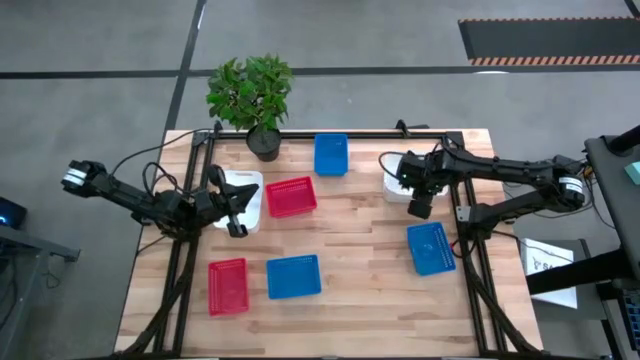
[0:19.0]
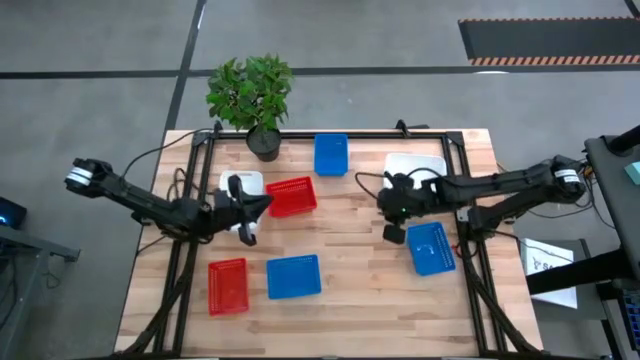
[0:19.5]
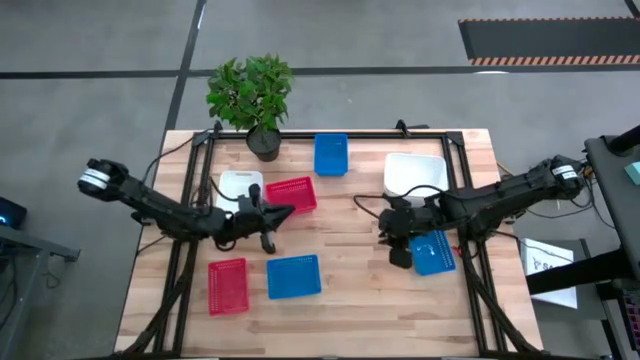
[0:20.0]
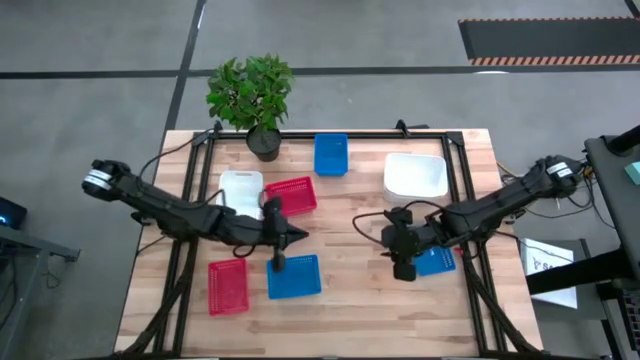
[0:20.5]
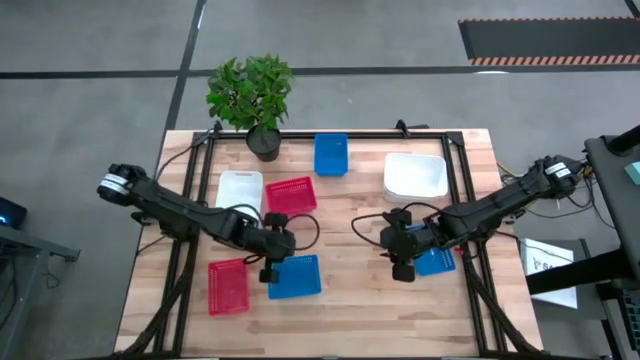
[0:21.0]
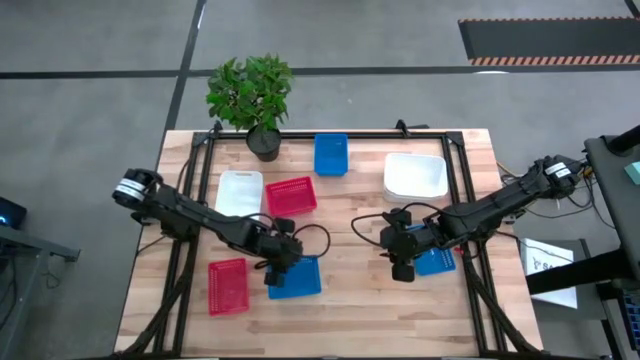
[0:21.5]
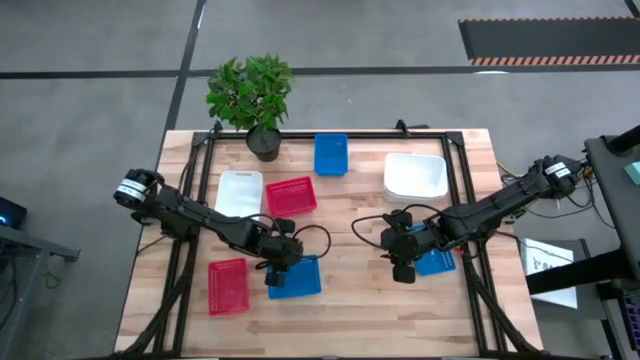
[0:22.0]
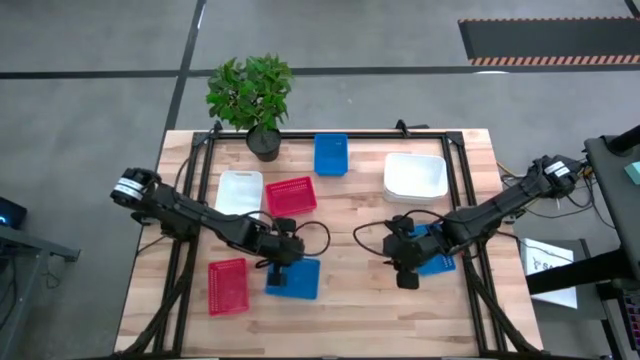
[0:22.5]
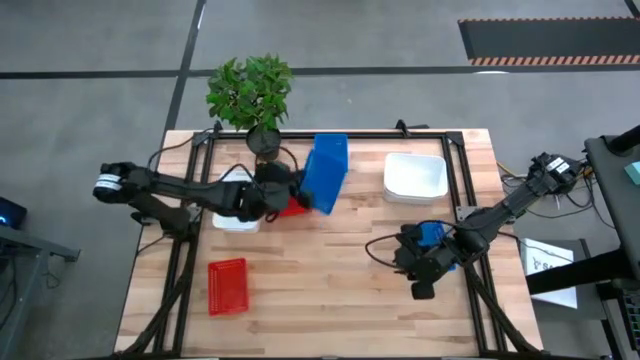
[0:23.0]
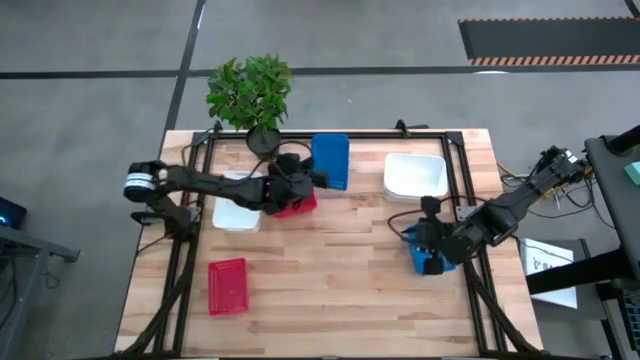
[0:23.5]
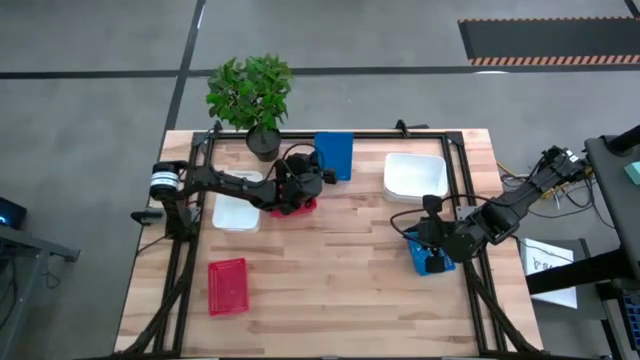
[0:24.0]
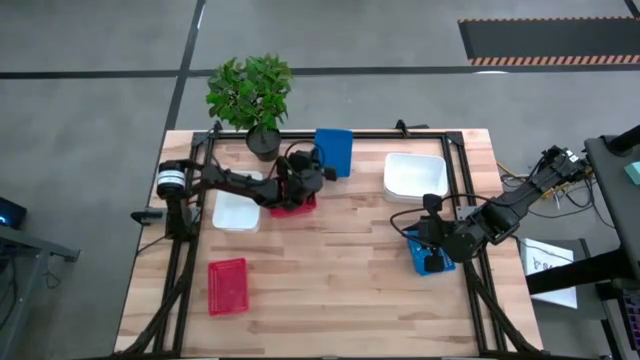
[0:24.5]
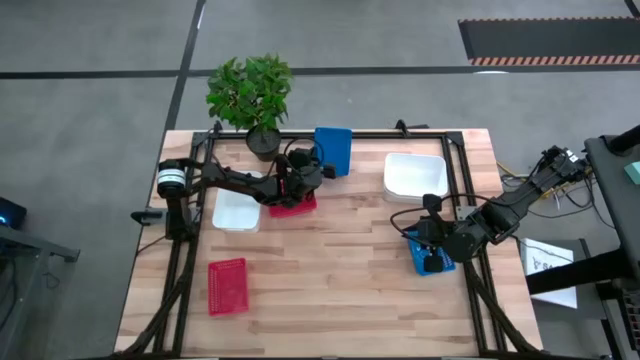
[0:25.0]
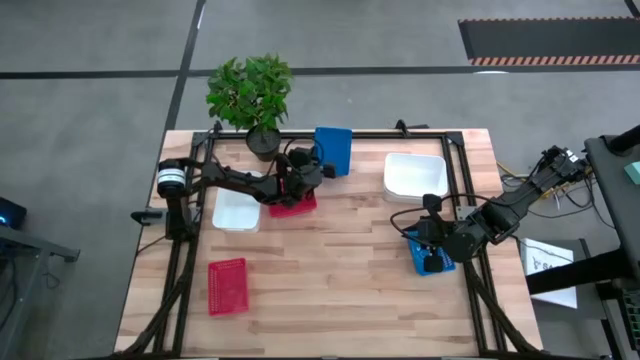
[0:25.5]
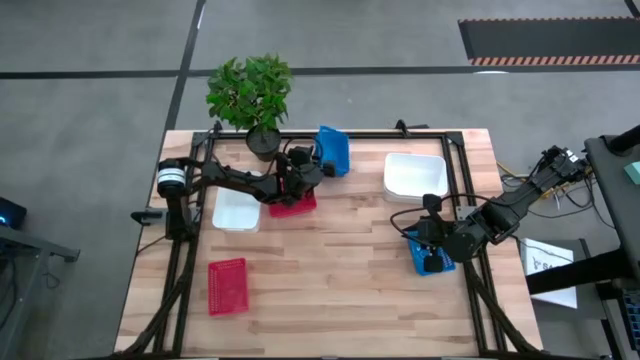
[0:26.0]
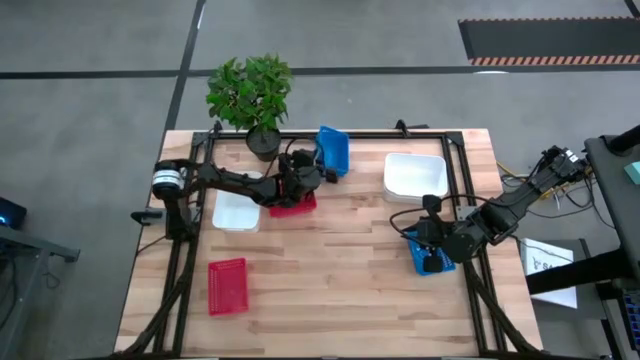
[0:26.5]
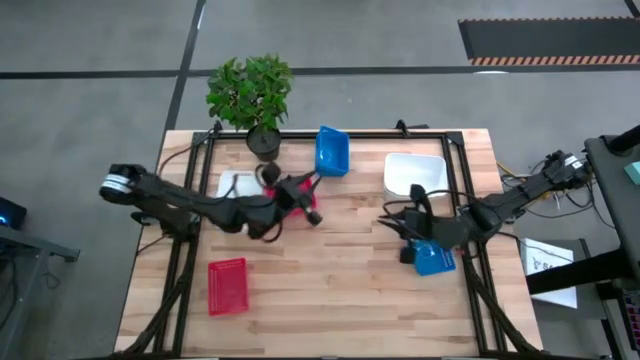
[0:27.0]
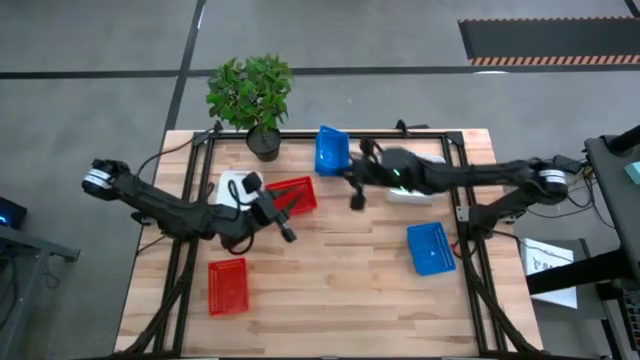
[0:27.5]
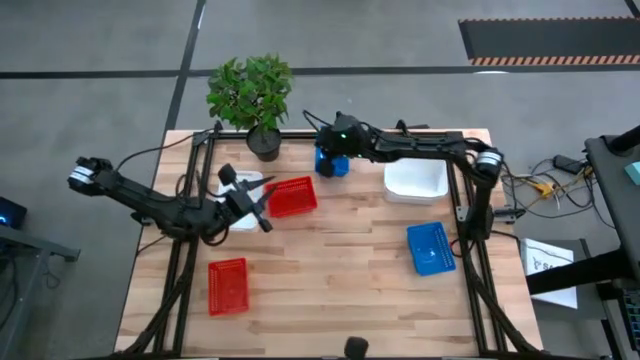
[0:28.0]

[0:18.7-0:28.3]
Stack the bottom left blue bin on the top blue bin

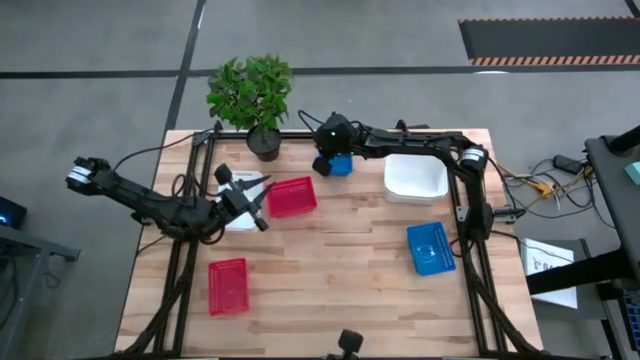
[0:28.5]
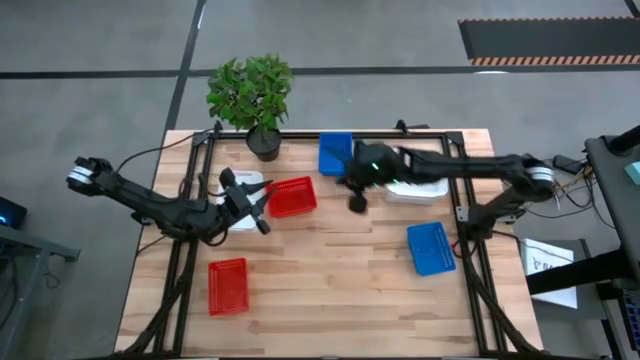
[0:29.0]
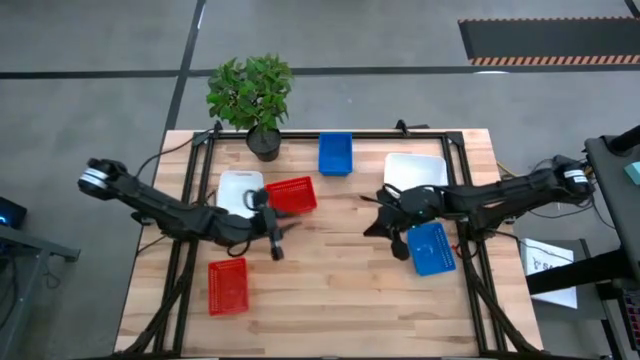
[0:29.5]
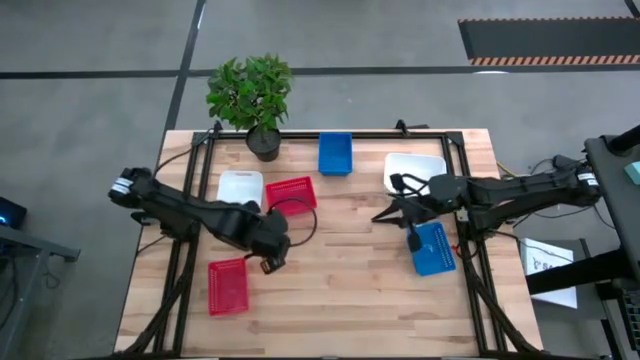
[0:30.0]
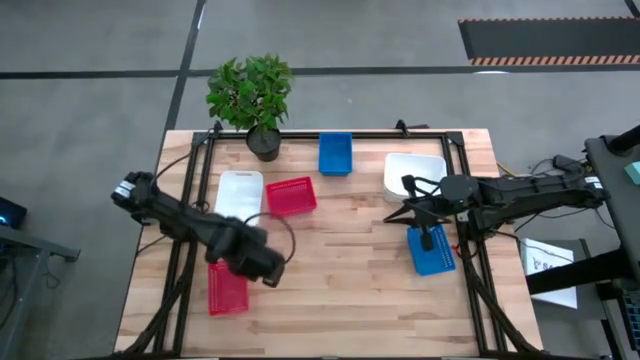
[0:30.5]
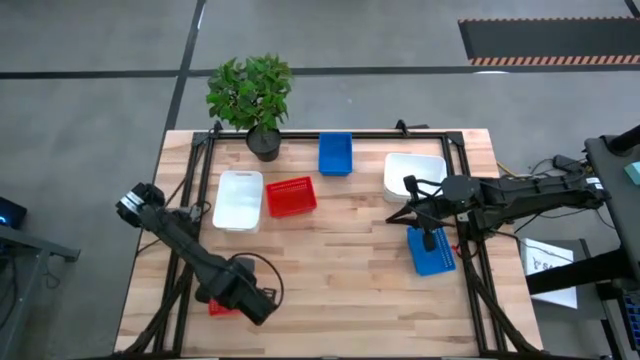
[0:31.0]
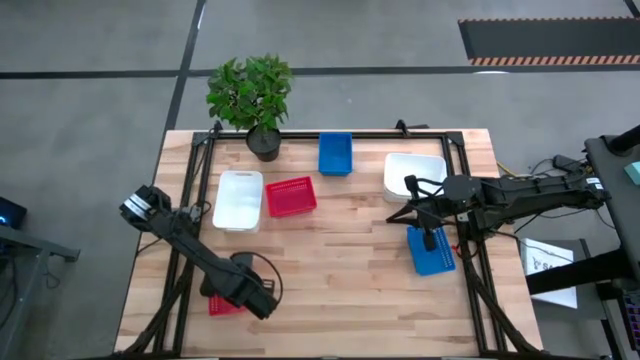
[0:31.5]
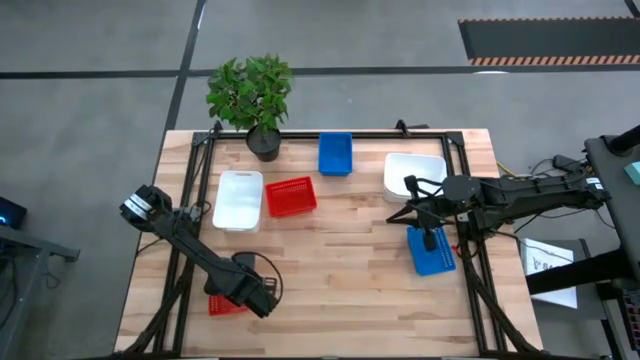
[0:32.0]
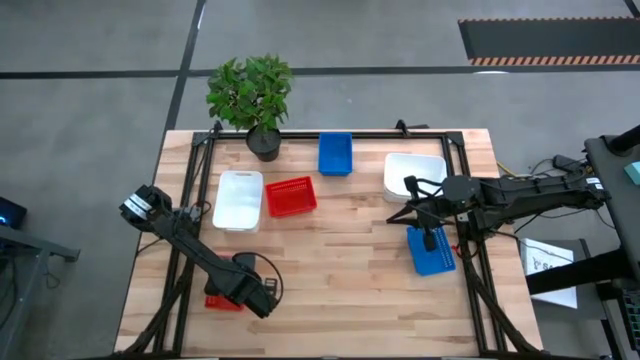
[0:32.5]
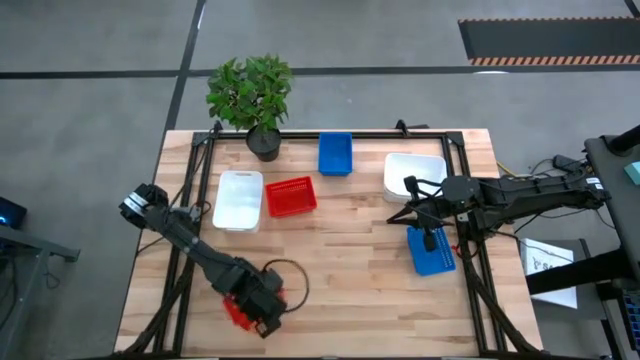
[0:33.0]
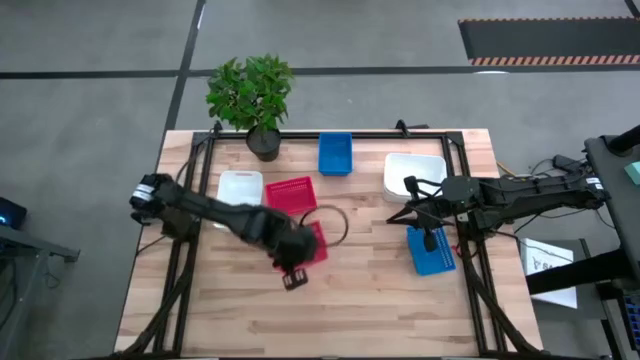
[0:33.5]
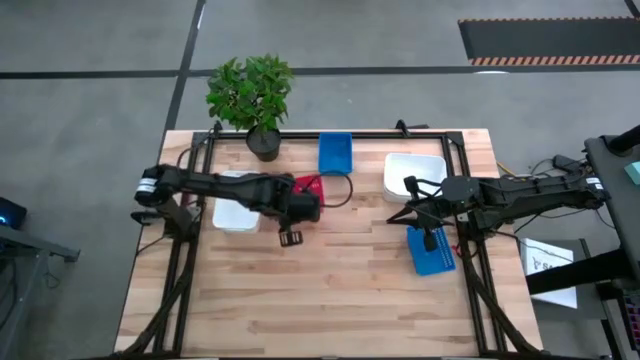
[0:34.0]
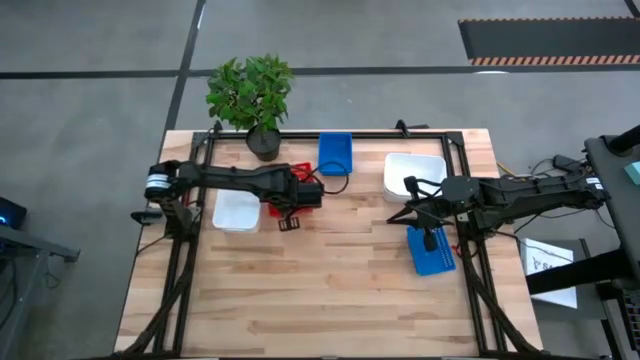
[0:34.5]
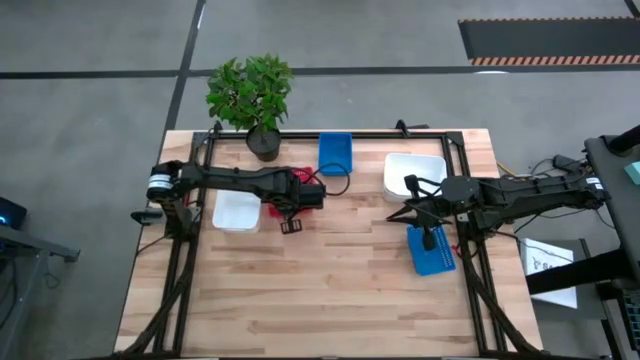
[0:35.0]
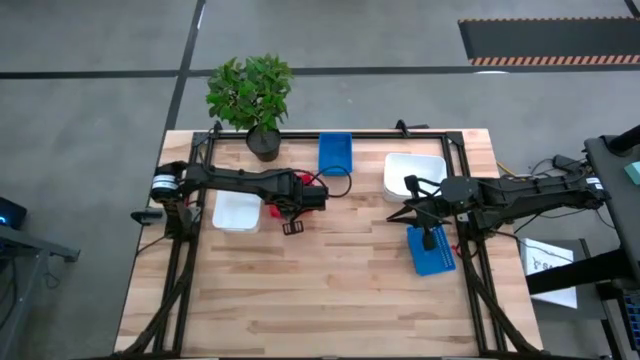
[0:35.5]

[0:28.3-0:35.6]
Stack the bottom red bin on the top stacked red bins
